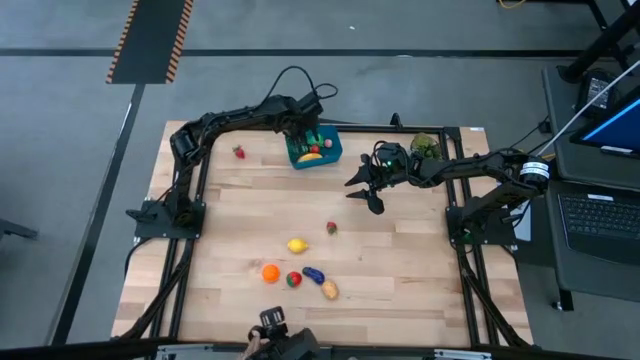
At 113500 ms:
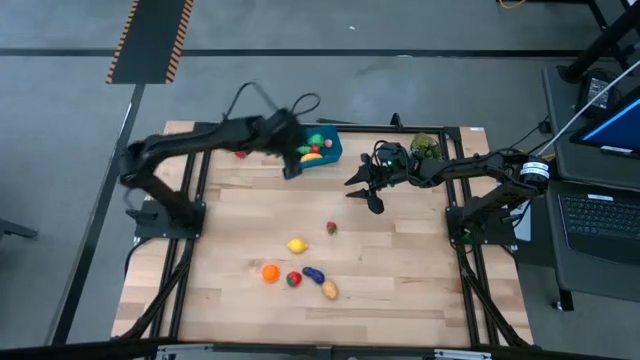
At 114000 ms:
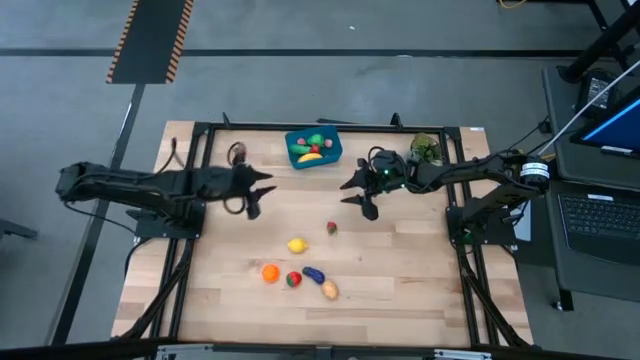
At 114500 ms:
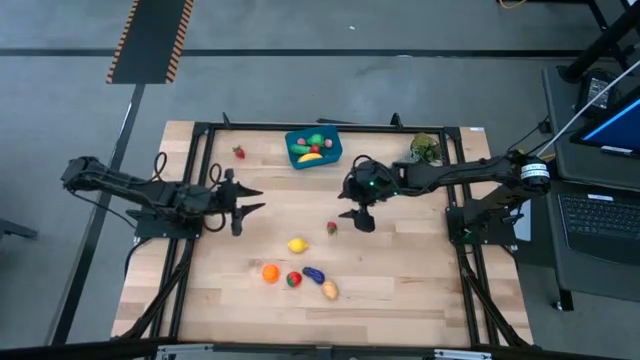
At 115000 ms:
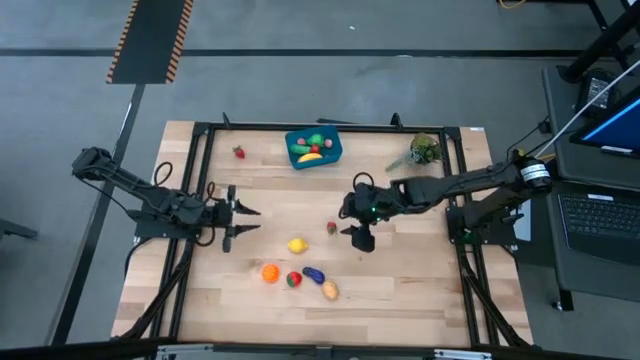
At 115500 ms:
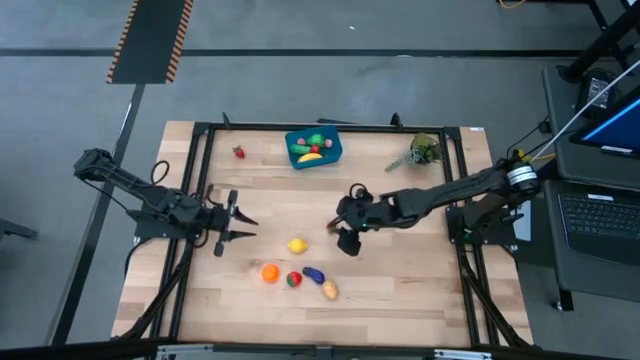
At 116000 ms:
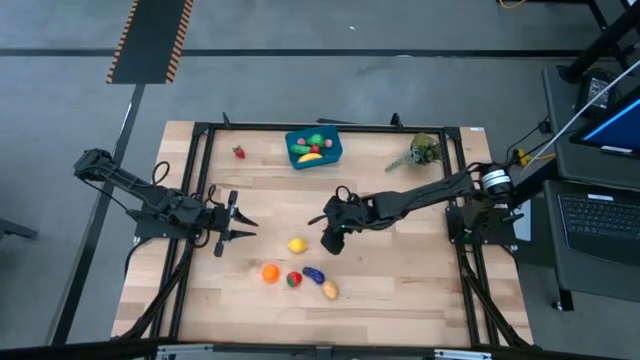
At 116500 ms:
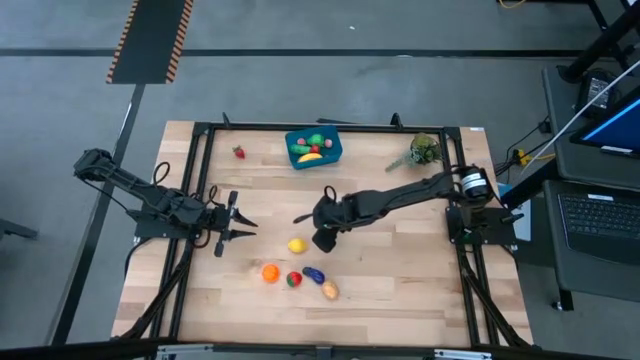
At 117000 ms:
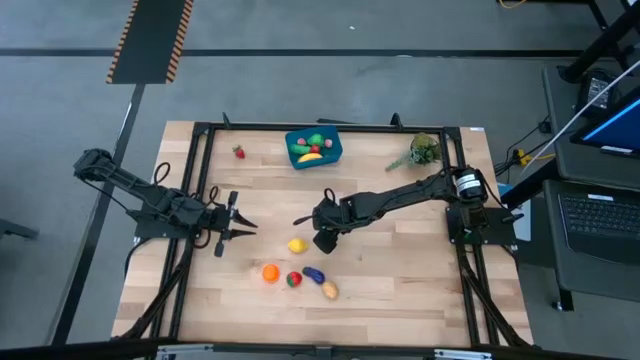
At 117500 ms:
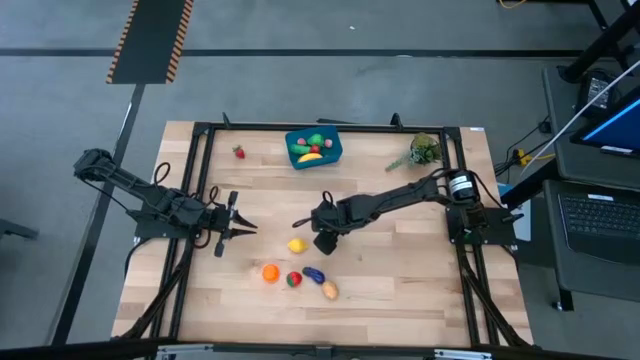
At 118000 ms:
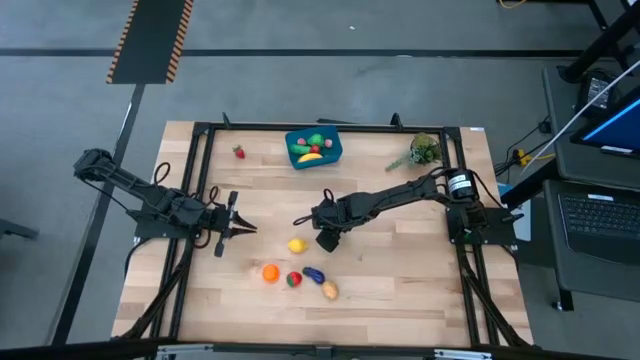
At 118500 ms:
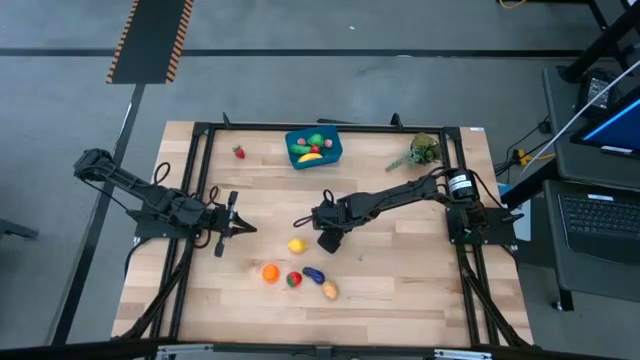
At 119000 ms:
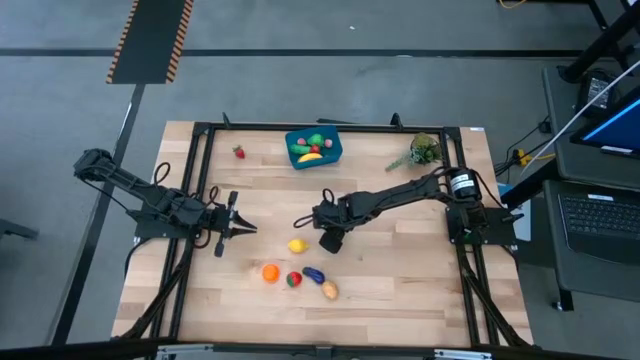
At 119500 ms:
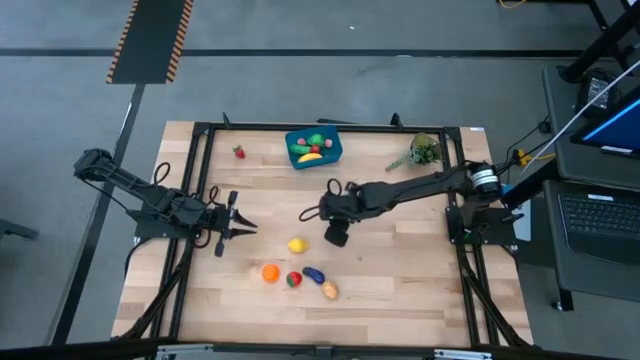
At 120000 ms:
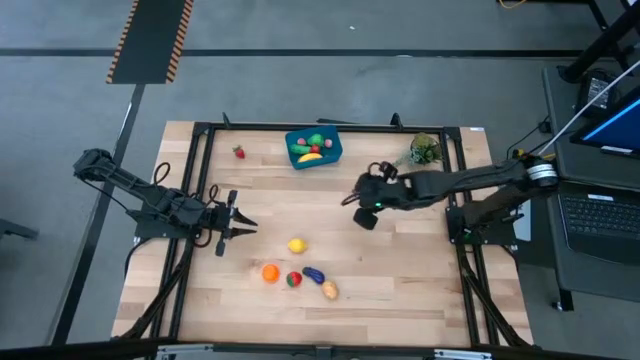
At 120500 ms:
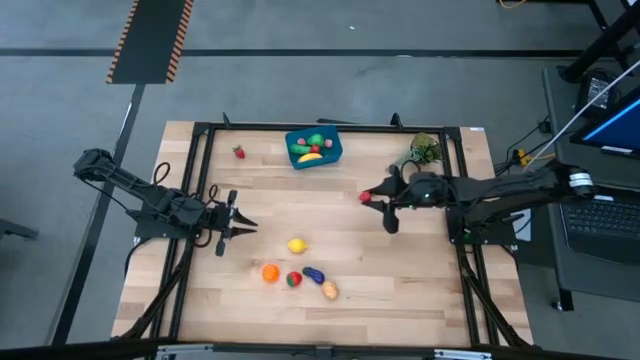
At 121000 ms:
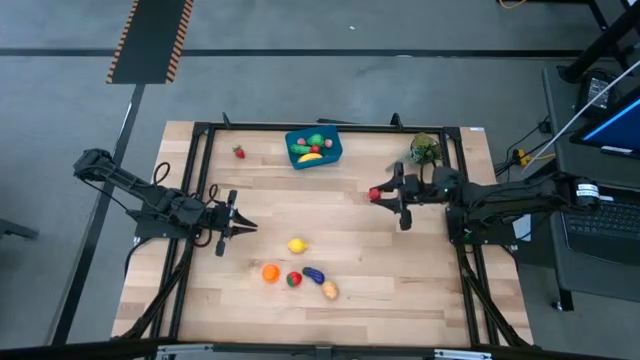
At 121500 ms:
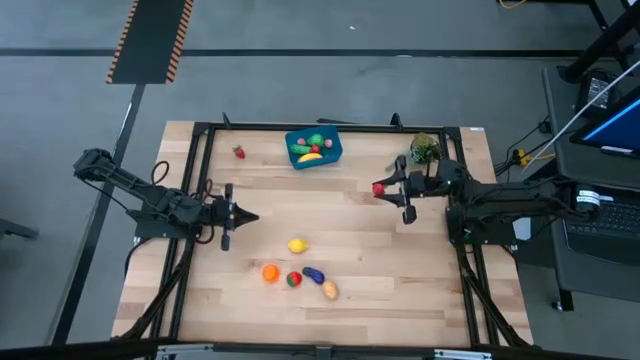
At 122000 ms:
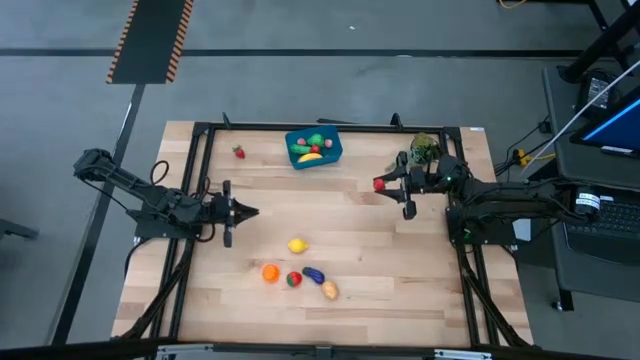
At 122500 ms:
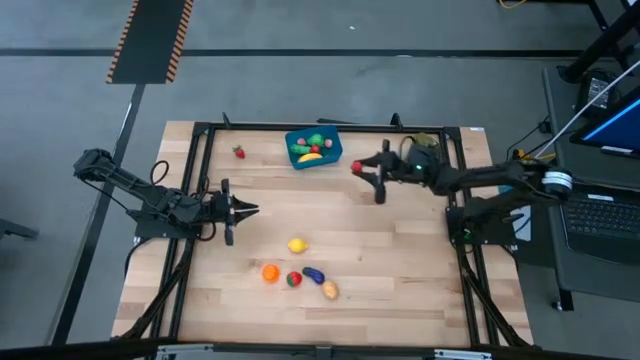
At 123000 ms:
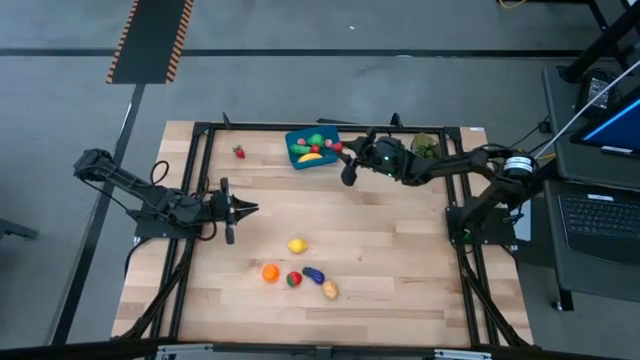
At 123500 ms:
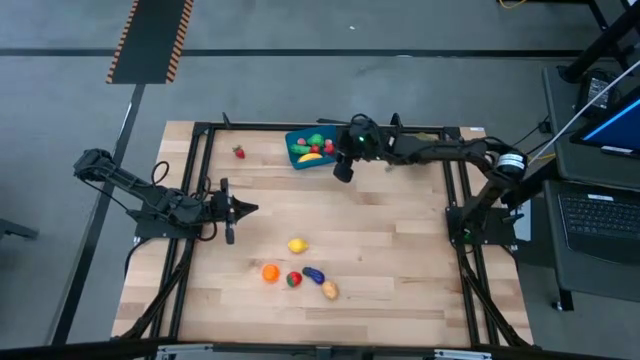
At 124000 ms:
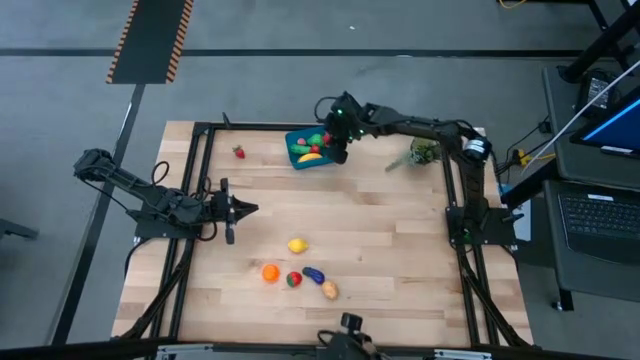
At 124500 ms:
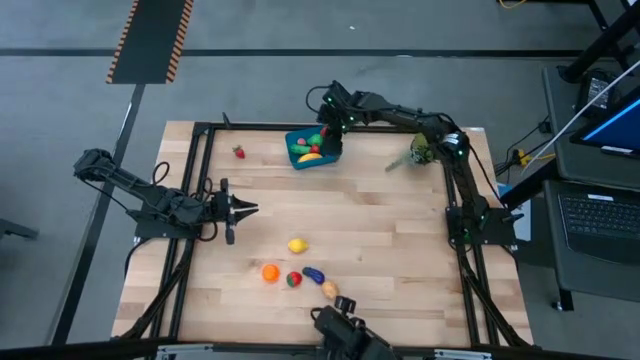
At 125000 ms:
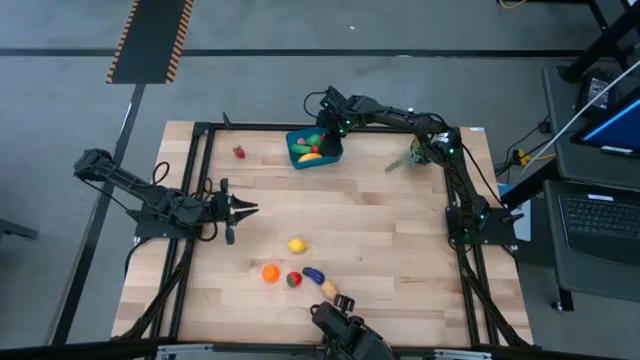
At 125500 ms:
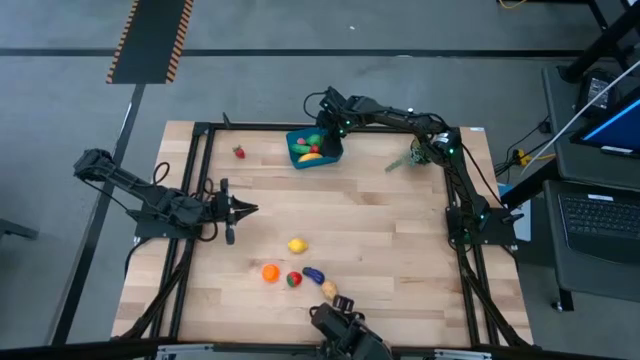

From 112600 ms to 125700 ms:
Task: Pick and placing Produce into tupperware
Put the strawberry into the blue bin

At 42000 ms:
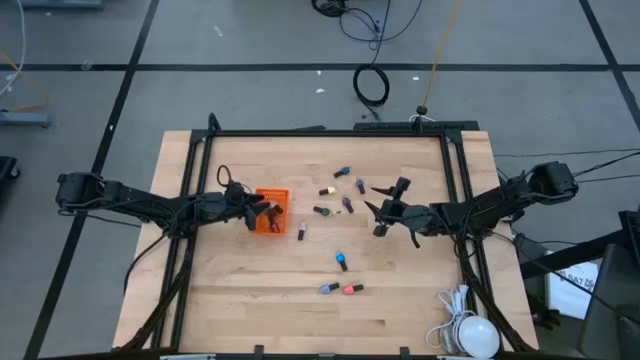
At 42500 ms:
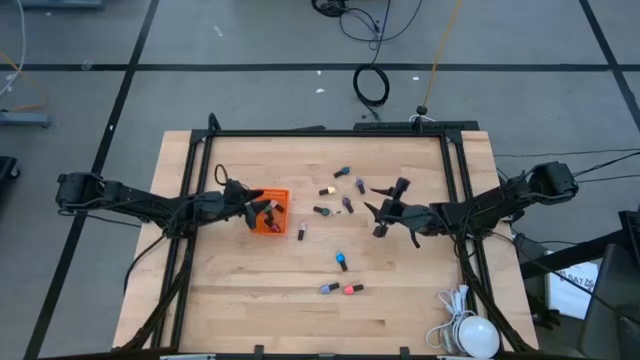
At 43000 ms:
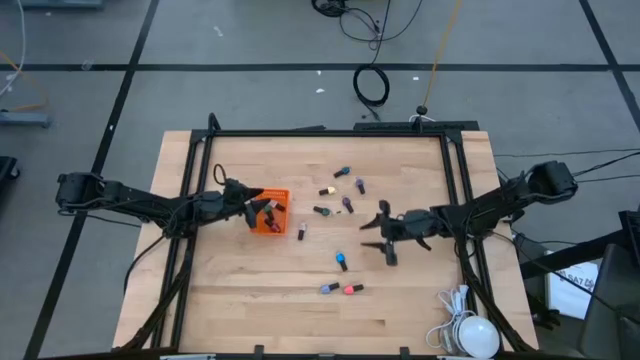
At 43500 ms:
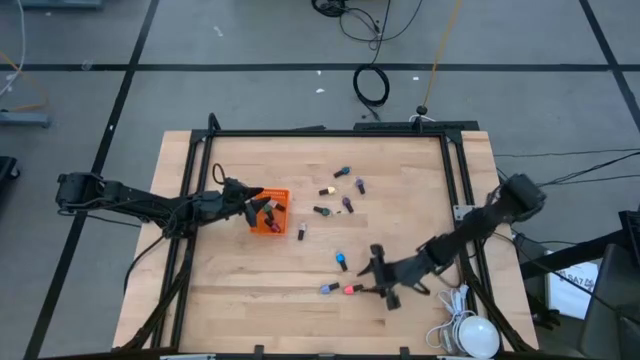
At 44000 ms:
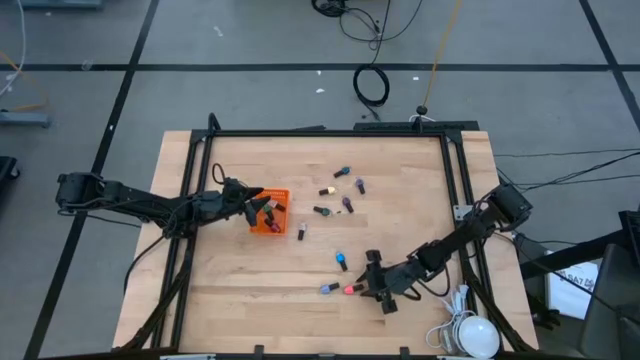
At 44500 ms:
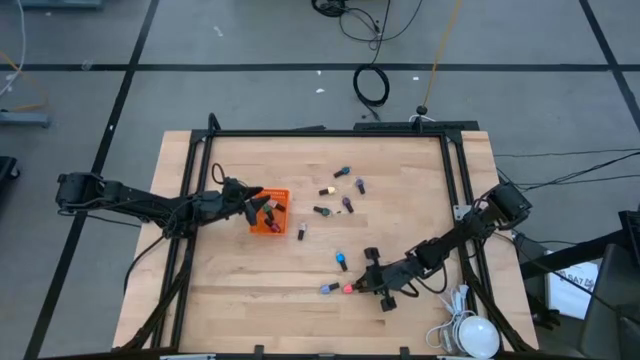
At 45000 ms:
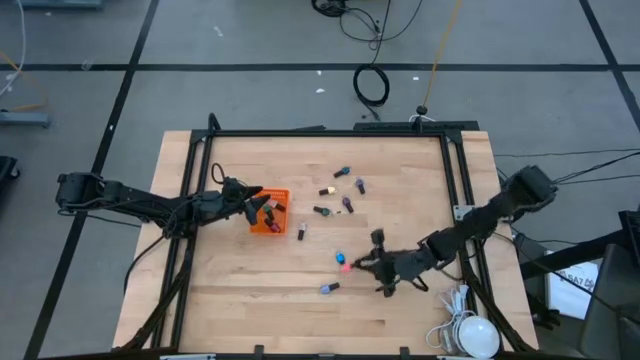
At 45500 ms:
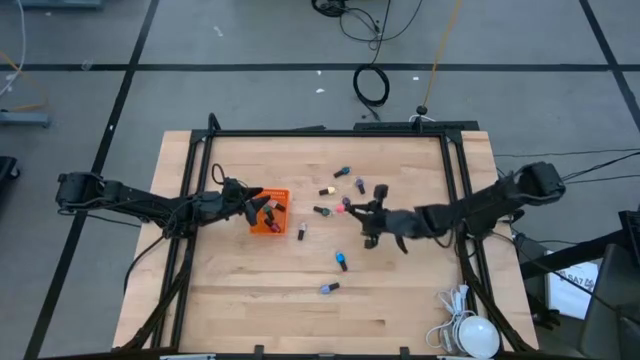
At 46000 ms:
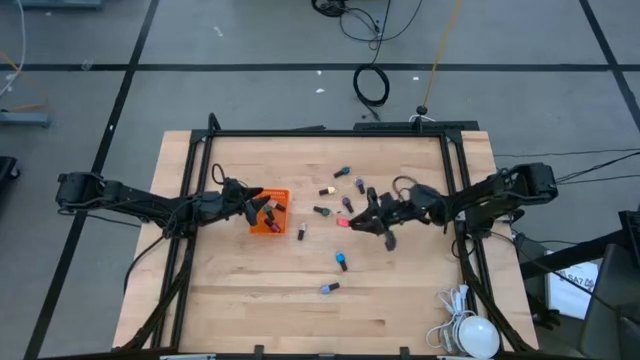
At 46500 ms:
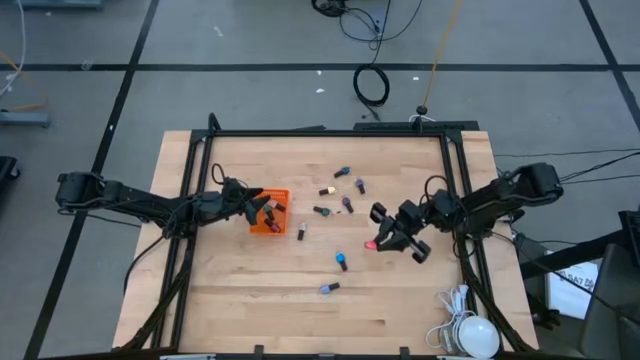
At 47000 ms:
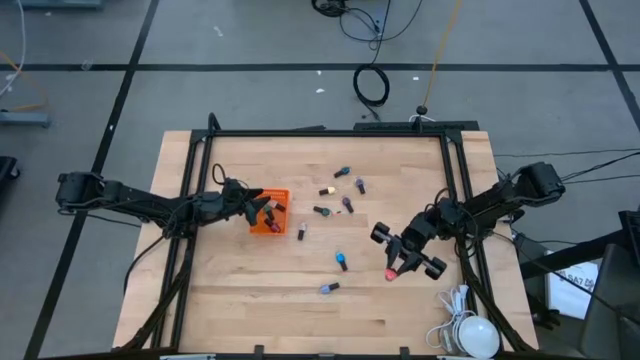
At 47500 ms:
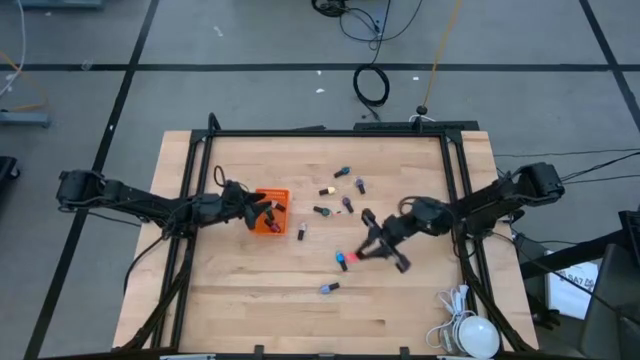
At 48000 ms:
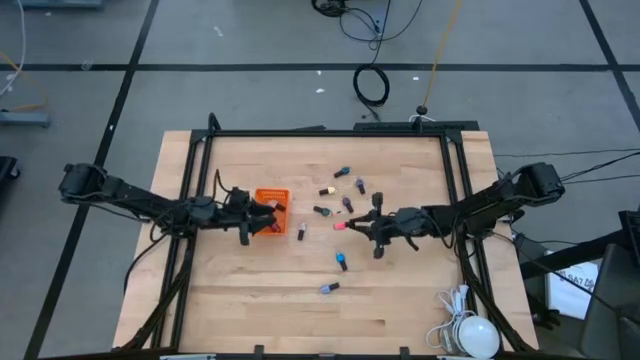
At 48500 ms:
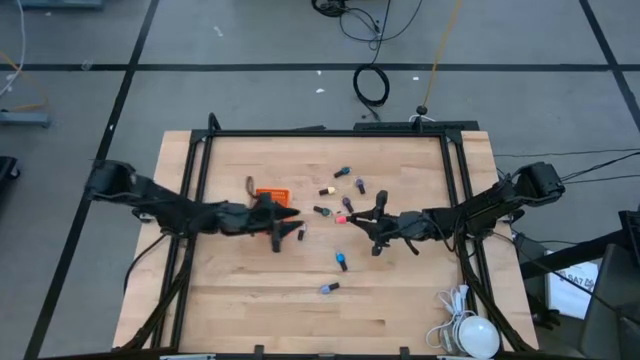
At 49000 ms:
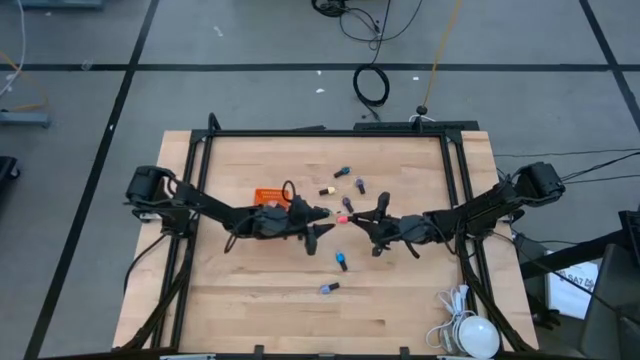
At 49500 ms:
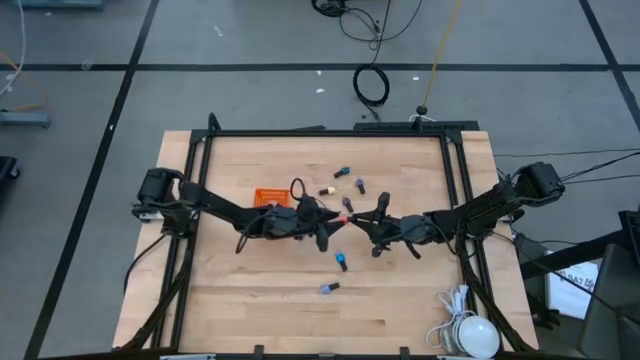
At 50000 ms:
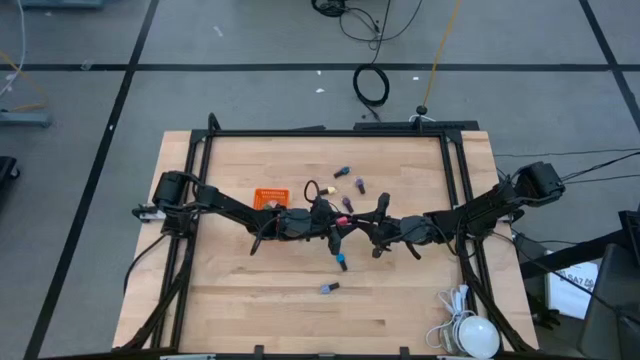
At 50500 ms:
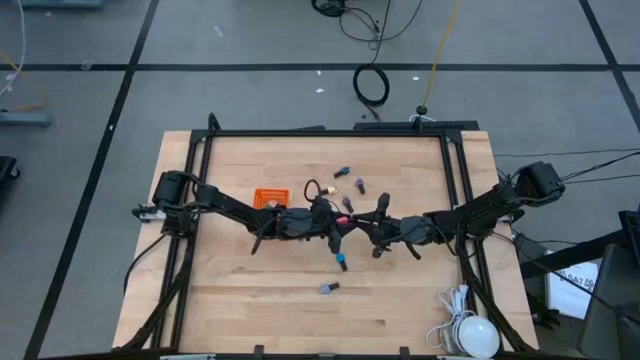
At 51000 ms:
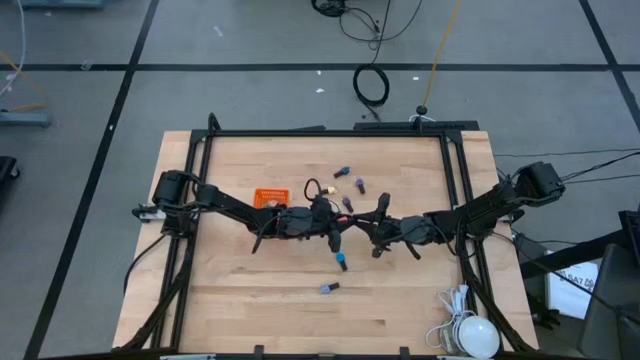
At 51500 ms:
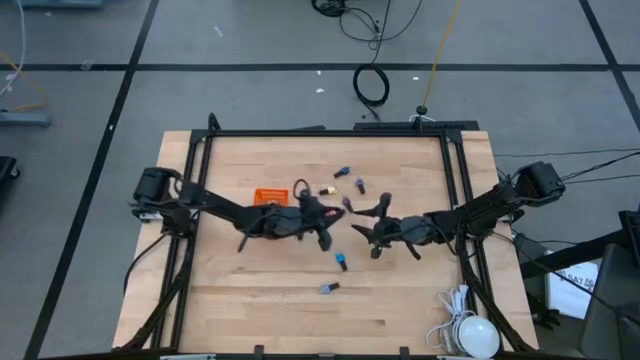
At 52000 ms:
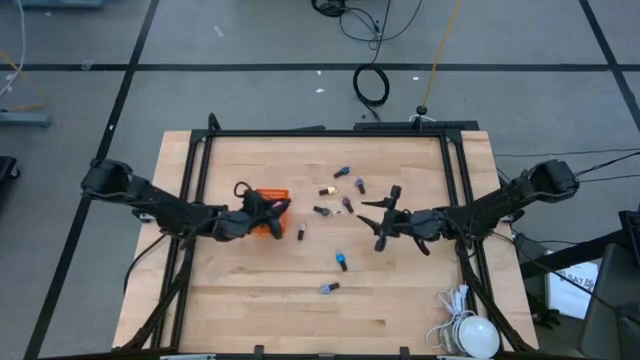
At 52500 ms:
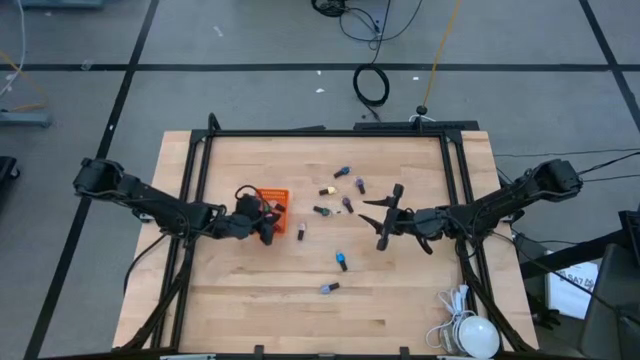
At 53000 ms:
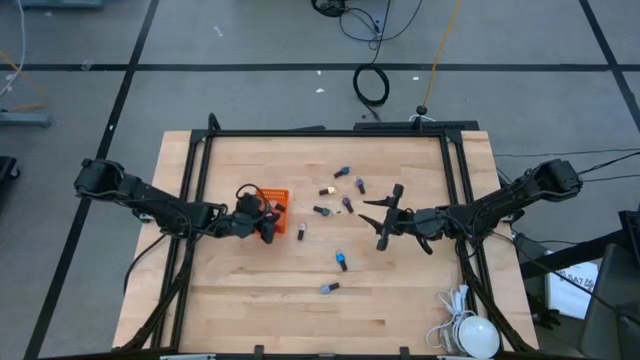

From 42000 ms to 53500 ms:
Task: Pick & Place Nail Polish
Put the pink nail polish into the orange basket
